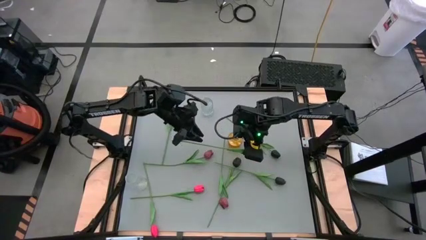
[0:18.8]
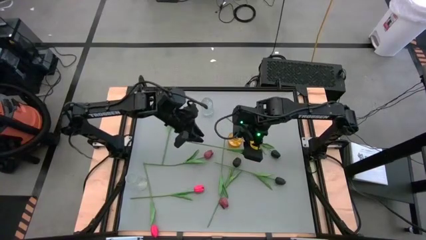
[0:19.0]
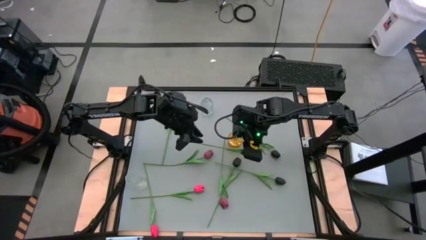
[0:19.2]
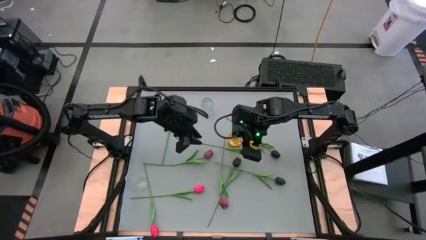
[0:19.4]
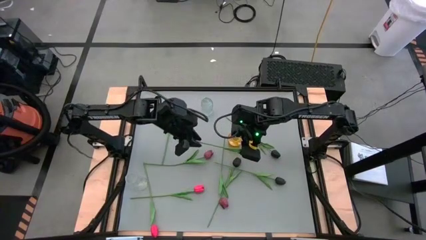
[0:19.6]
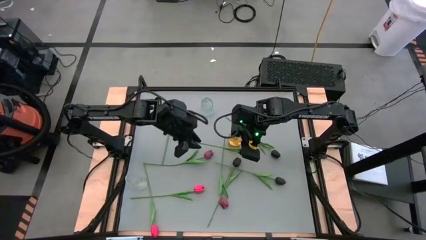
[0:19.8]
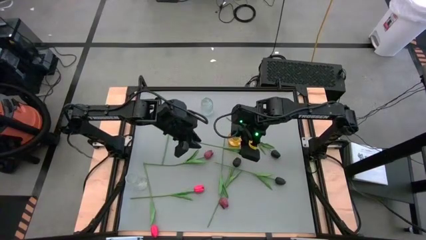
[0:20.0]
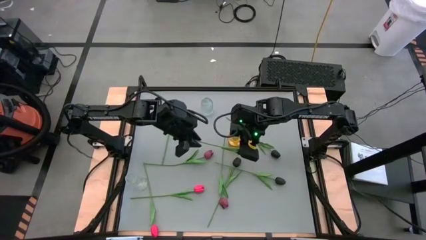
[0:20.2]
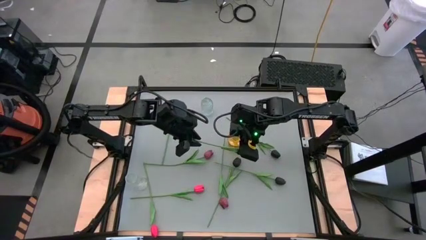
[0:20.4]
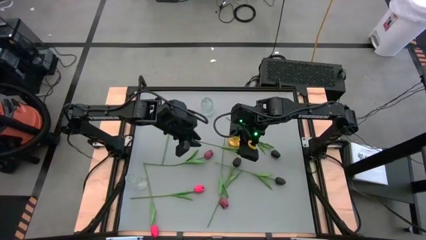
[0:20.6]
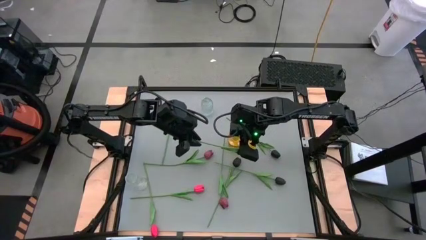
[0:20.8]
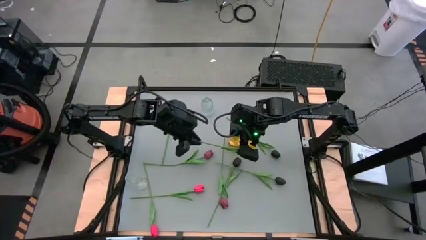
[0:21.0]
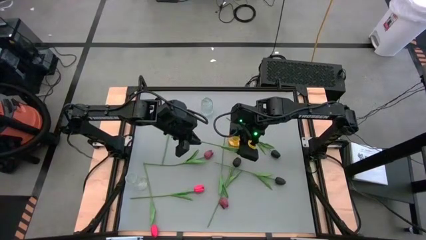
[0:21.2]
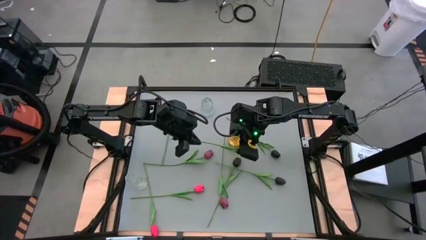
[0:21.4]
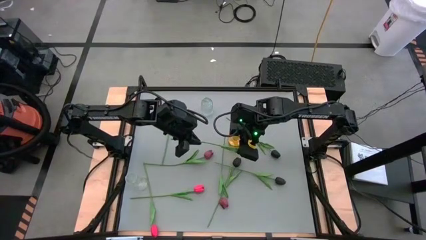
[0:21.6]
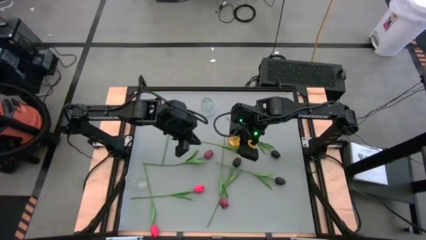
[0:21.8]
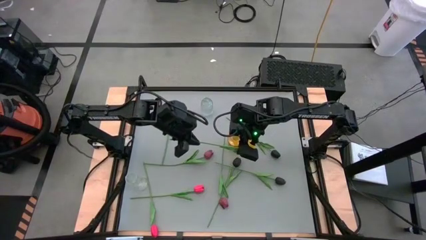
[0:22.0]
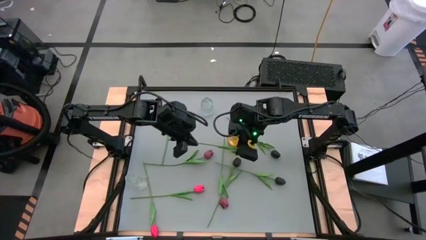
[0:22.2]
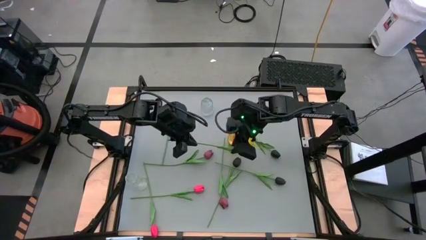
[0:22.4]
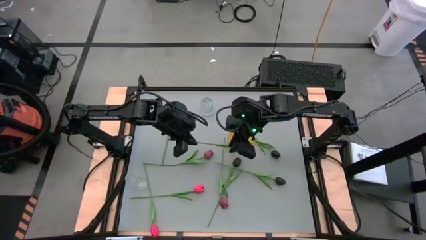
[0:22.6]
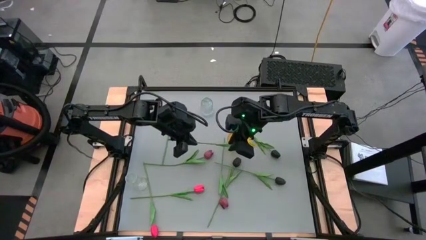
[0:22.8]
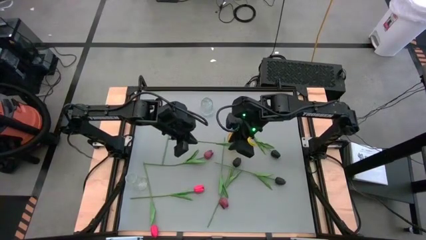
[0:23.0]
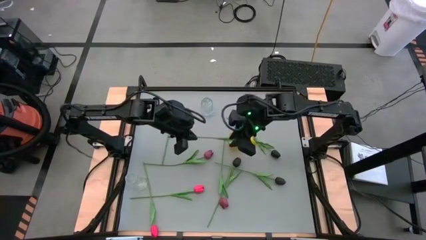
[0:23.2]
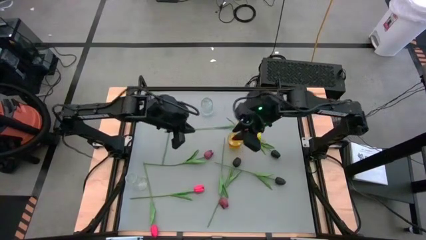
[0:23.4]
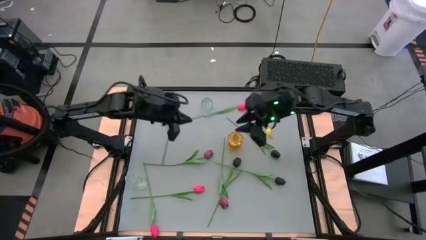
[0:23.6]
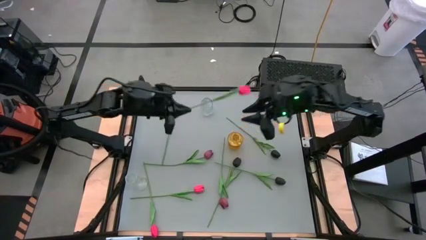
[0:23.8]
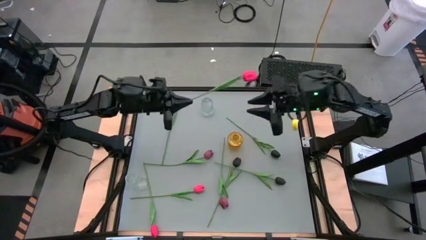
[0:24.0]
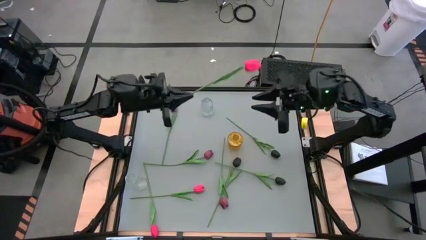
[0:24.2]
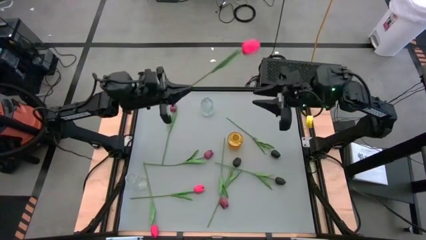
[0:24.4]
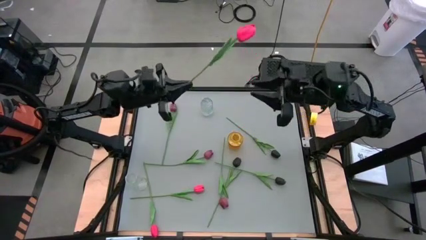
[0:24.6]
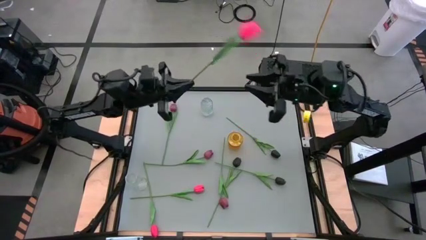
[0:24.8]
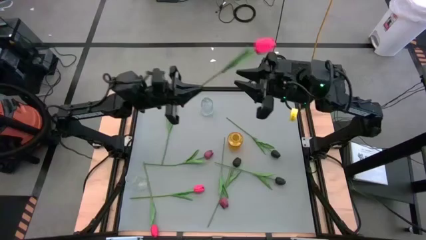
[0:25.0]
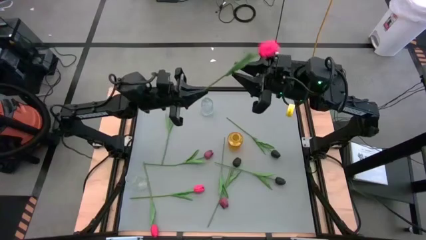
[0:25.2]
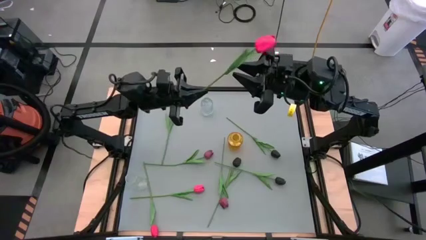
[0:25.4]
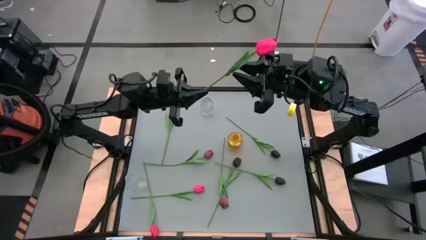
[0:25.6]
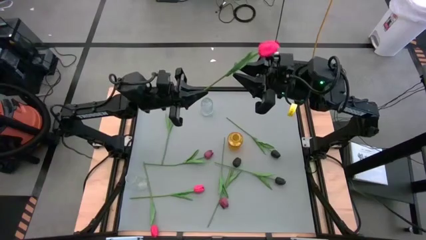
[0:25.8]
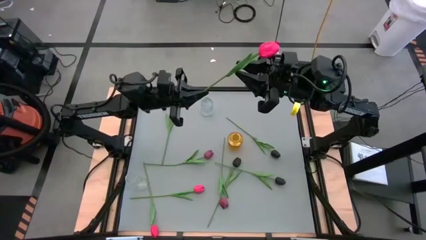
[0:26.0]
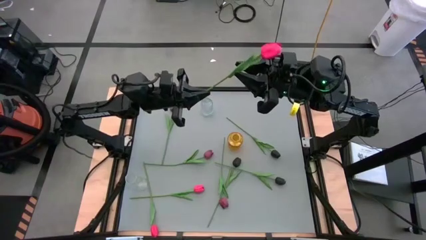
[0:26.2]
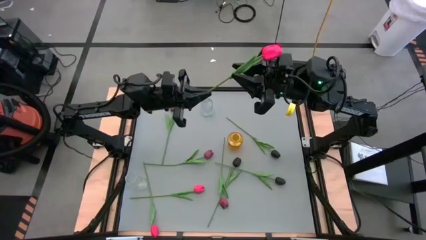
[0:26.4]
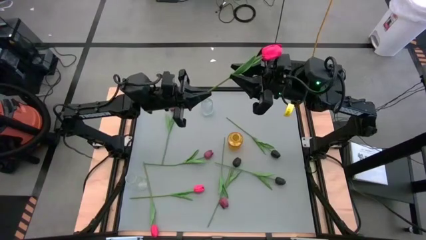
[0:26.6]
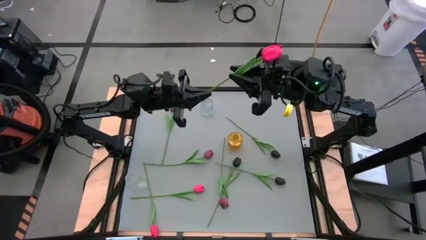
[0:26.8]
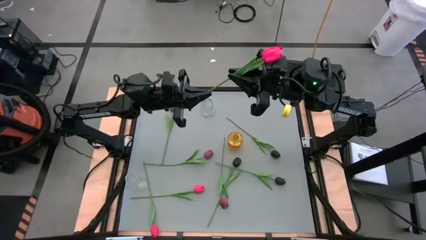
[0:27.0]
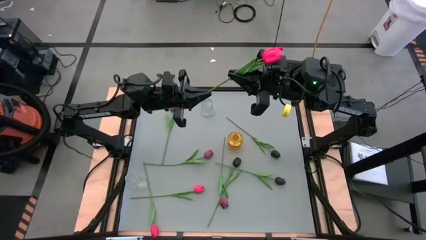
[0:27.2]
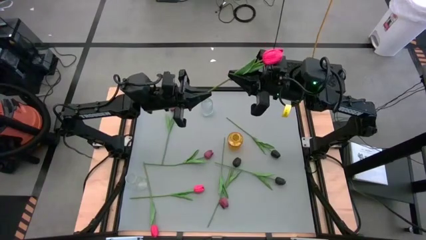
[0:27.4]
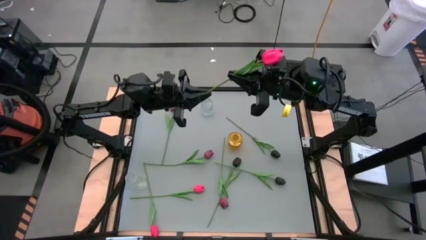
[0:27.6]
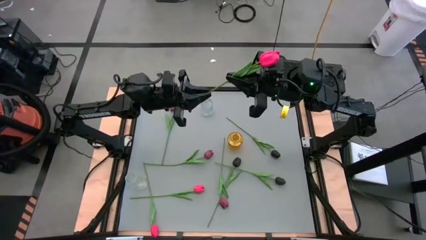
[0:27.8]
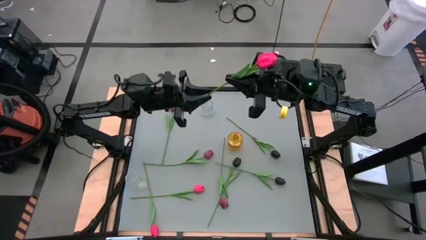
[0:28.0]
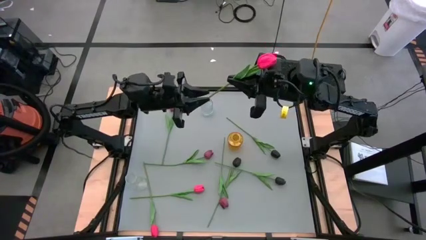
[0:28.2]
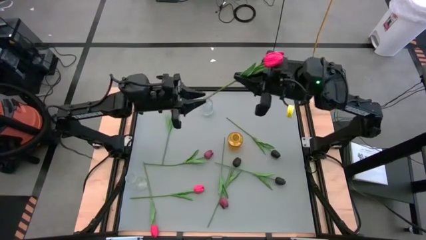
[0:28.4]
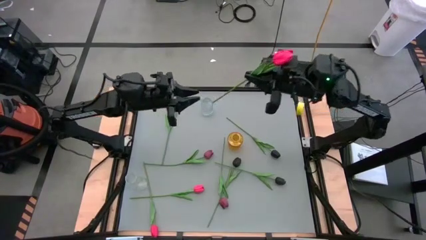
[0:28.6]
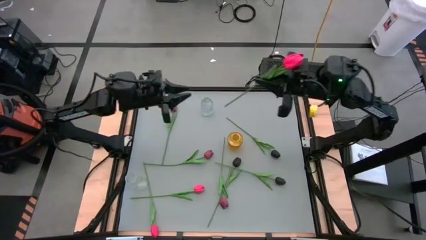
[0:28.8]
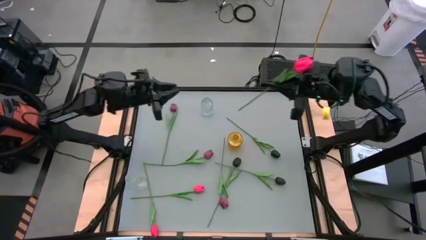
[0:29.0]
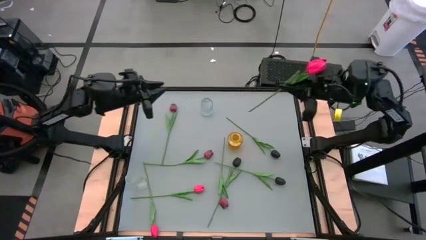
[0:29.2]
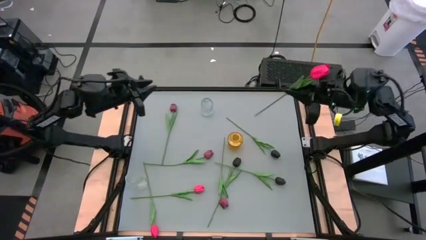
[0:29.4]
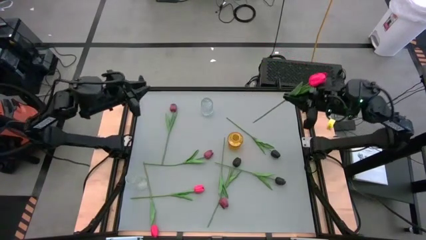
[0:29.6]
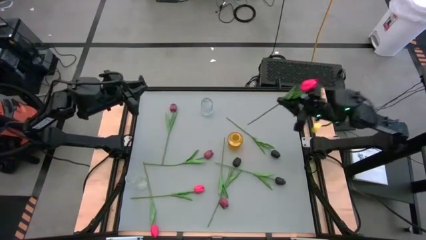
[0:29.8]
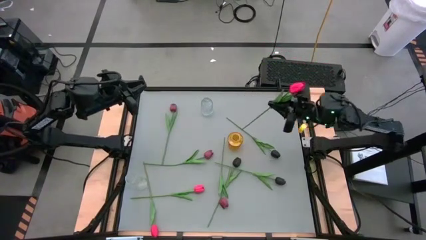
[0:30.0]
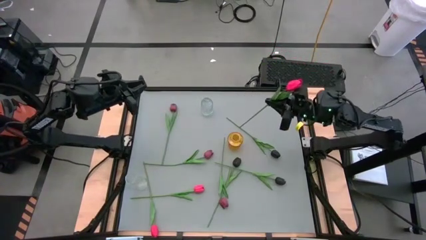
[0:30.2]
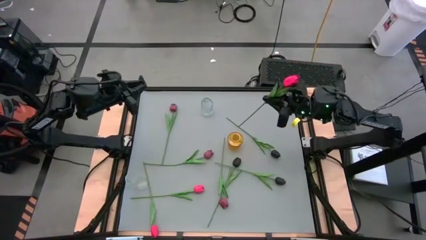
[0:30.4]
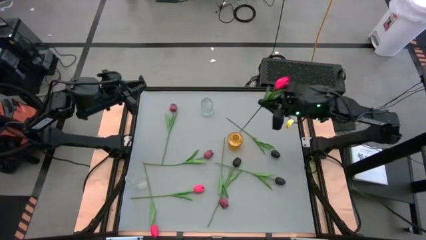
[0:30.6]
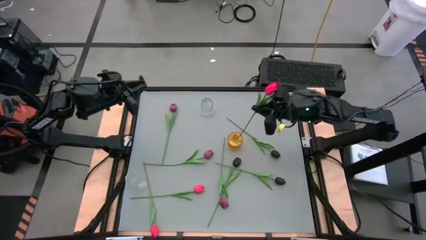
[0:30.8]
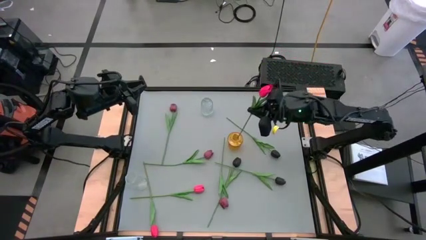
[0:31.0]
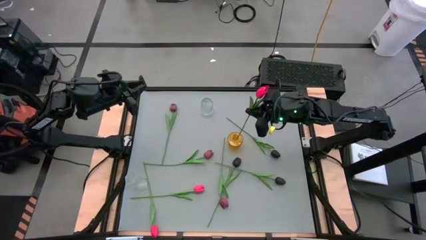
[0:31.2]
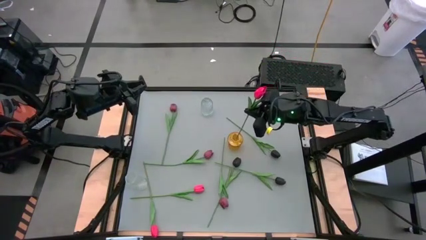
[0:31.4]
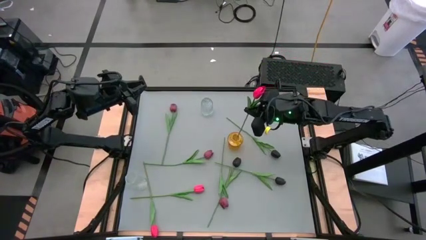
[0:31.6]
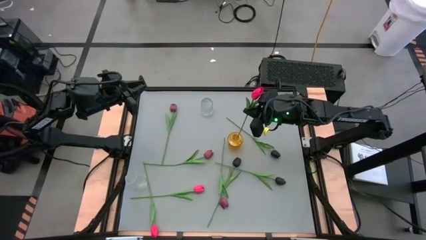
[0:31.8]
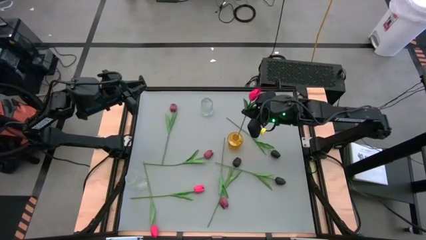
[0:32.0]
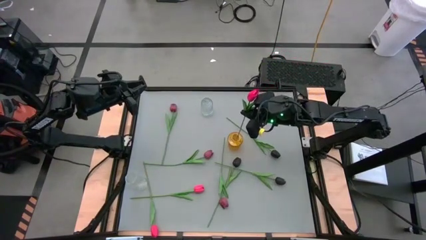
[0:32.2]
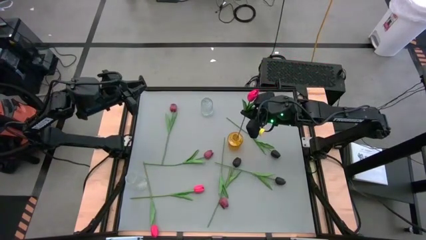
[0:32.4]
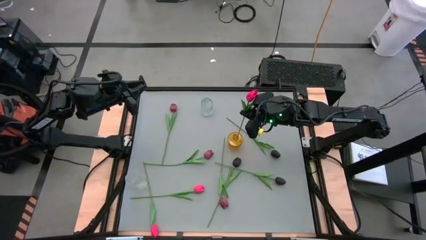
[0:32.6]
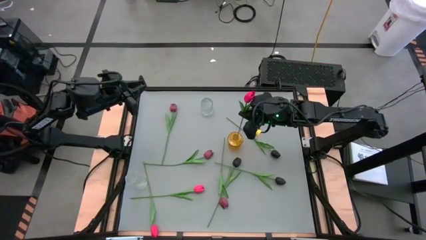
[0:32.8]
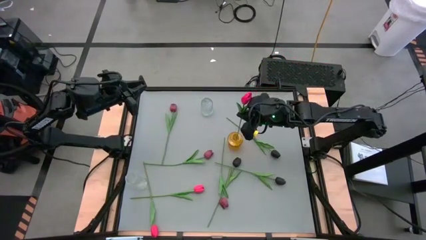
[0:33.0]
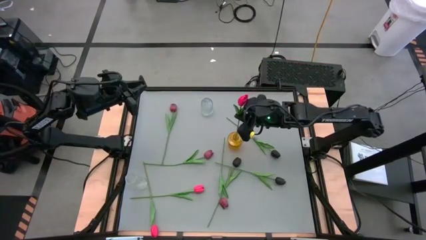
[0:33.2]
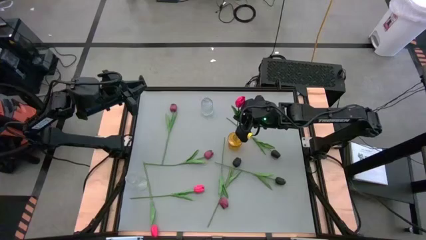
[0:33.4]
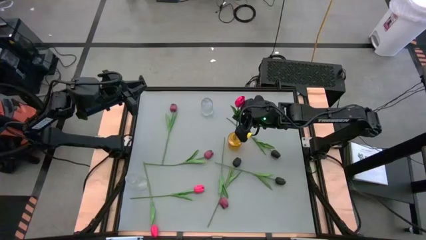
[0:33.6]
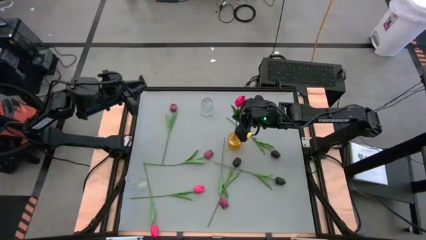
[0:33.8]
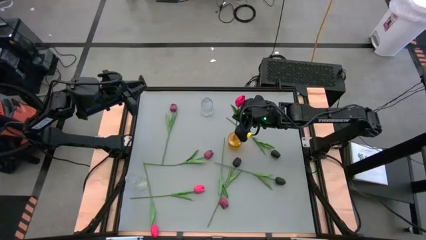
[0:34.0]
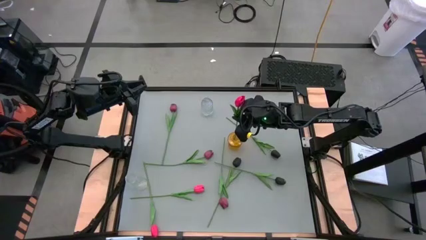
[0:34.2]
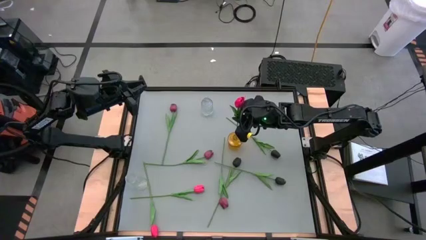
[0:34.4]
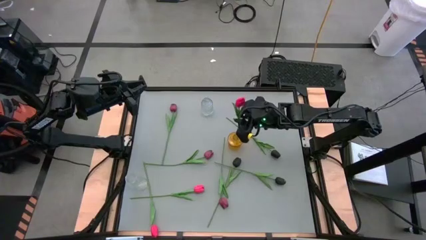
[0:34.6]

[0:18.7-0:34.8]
Task: Sort flowers into vase by color
Put the top pink tulip into the yellow vase
